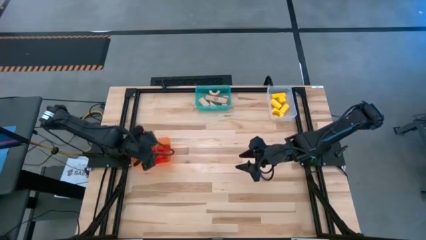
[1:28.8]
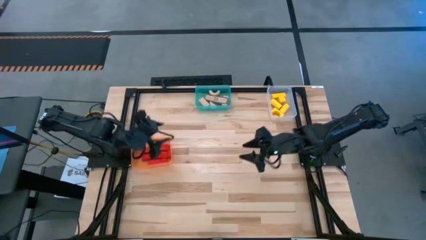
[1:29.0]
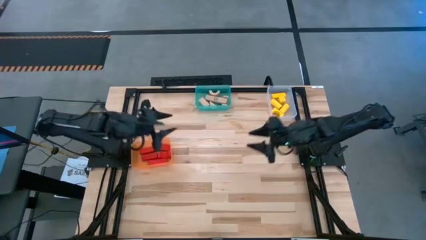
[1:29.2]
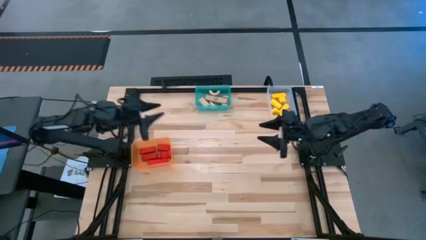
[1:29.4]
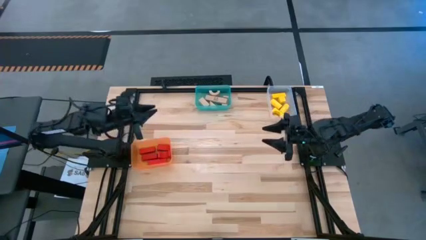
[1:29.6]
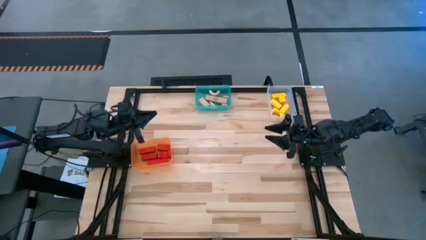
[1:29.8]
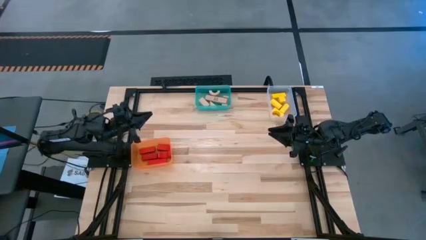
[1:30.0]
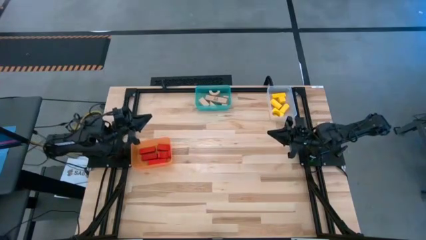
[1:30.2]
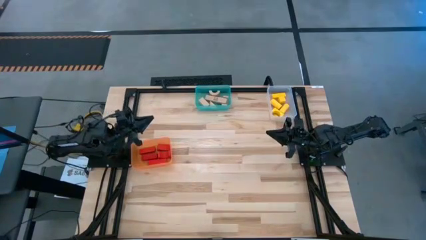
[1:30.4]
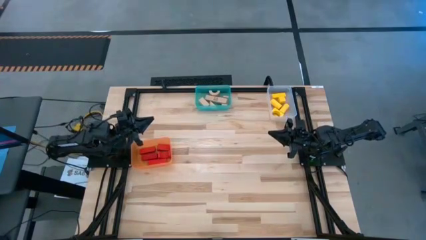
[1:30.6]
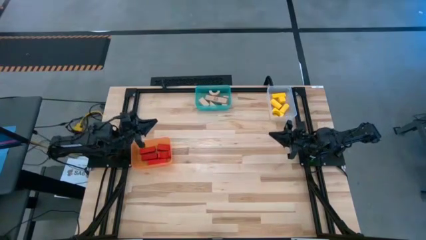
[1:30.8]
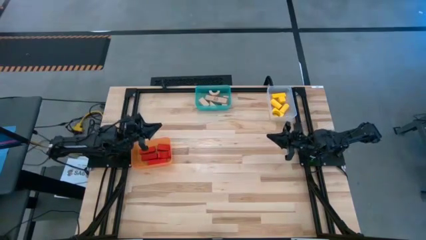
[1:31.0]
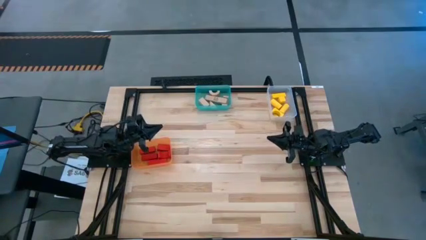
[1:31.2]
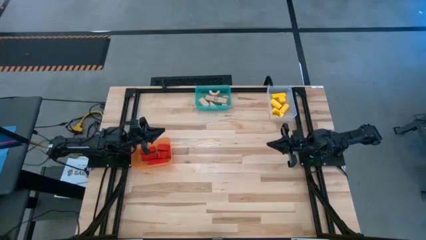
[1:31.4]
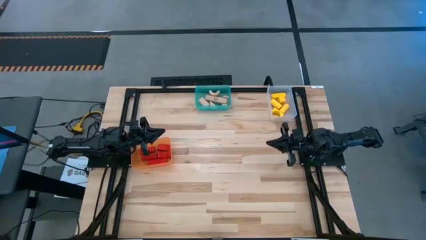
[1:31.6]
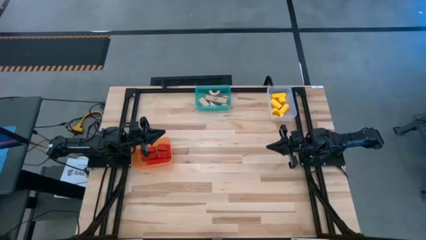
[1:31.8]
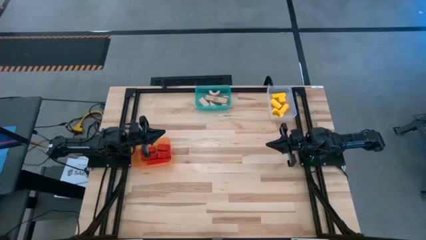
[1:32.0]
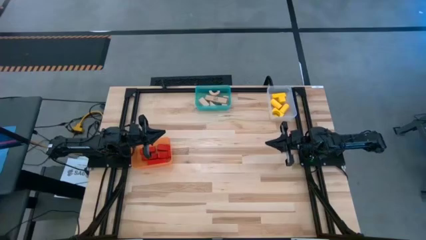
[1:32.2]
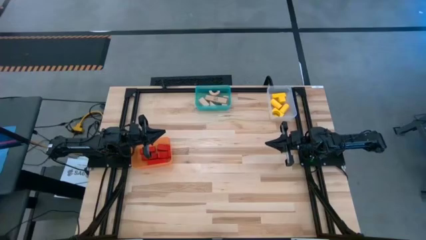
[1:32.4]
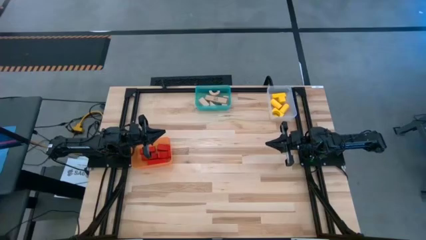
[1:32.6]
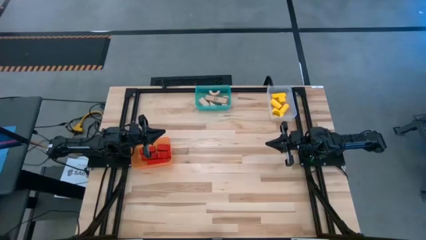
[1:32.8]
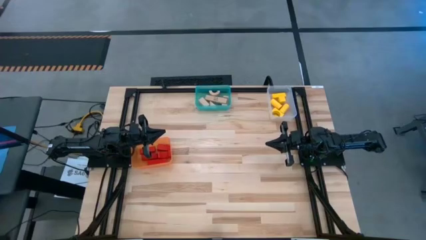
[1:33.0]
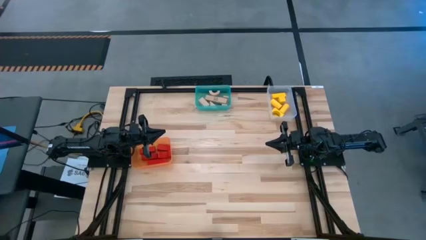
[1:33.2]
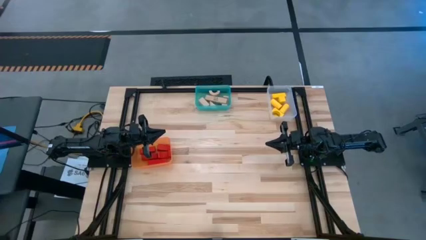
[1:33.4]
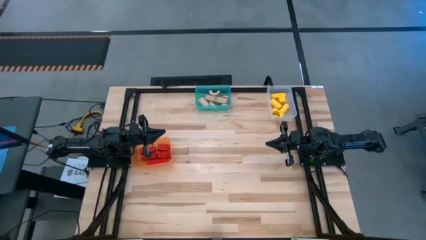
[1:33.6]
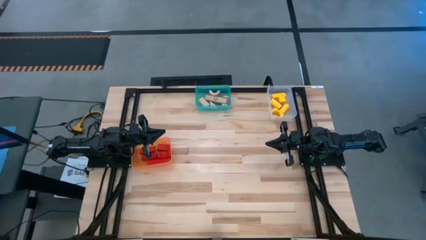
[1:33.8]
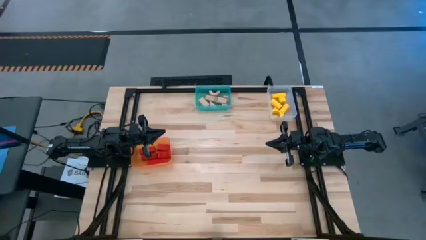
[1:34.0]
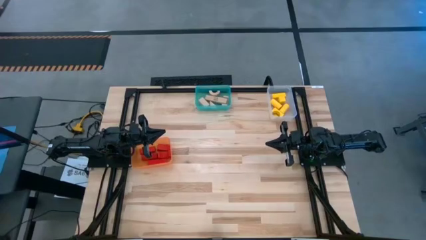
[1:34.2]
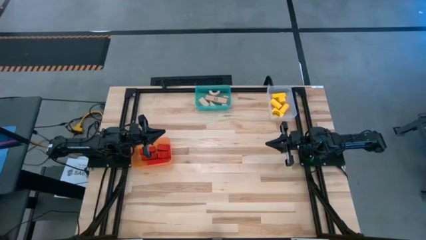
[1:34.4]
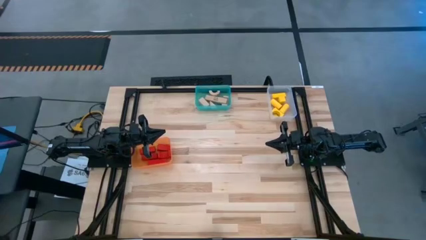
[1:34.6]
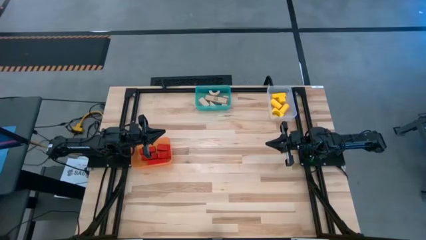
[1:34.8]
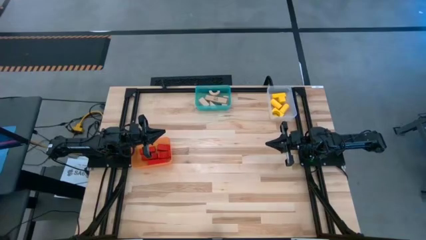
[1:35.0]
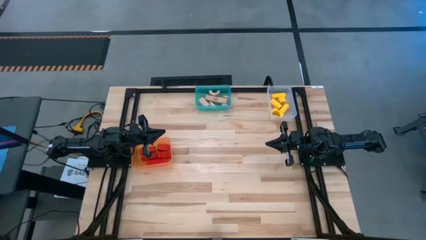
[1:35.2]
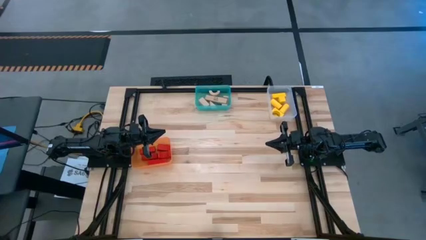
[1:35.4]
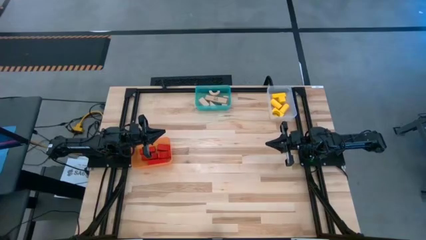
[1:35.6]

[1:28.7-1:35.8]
Task: Sort & place blocks by color
Return to Home Position

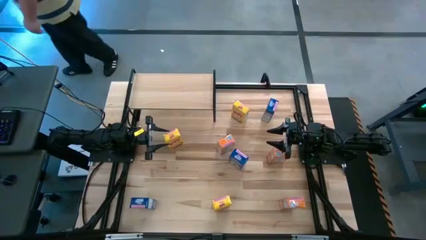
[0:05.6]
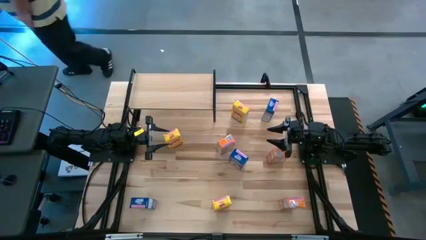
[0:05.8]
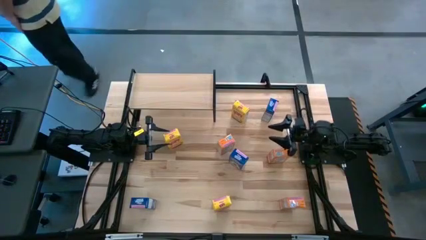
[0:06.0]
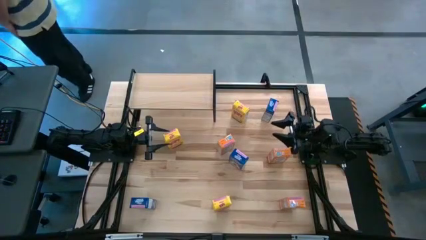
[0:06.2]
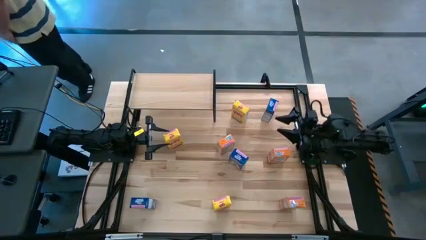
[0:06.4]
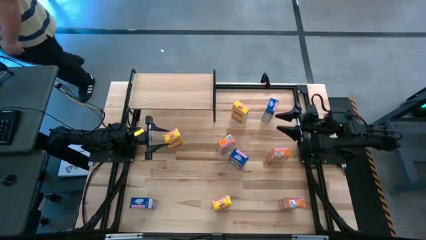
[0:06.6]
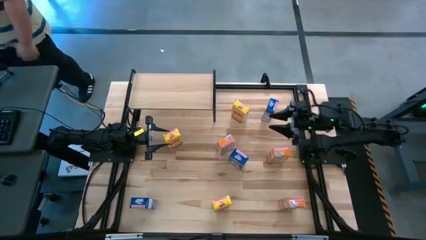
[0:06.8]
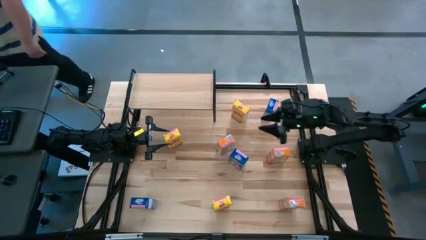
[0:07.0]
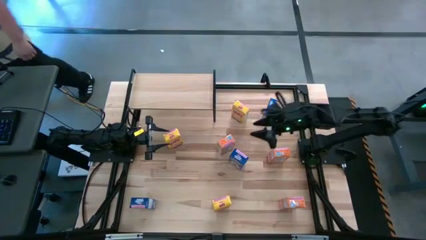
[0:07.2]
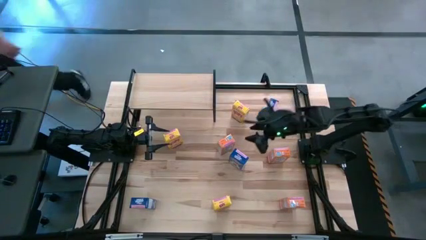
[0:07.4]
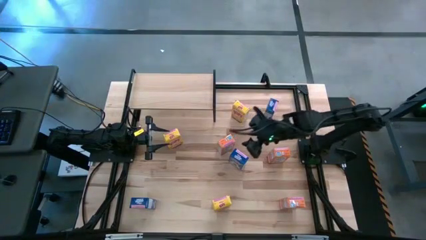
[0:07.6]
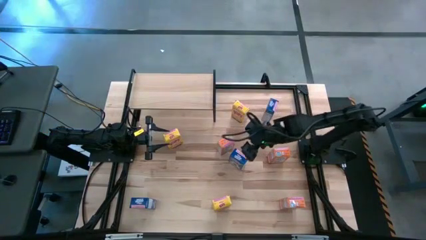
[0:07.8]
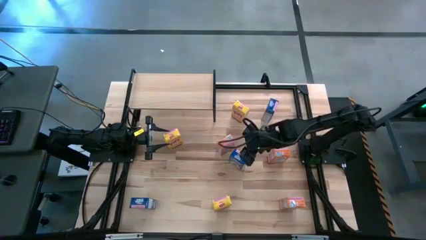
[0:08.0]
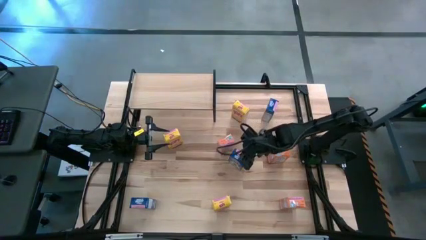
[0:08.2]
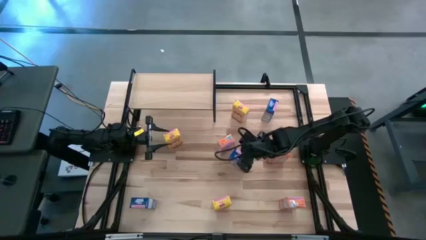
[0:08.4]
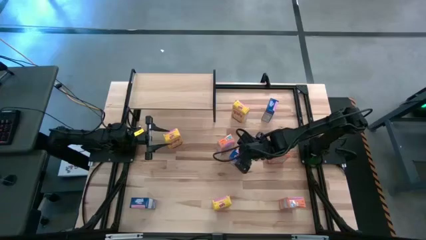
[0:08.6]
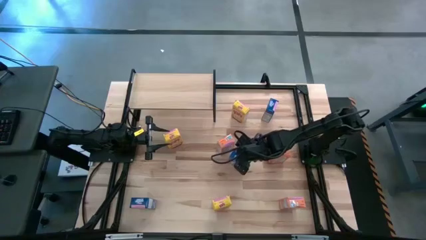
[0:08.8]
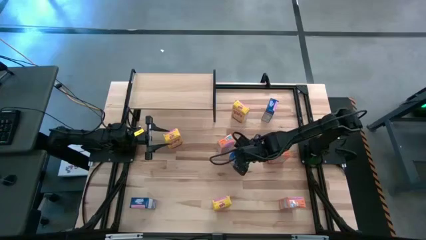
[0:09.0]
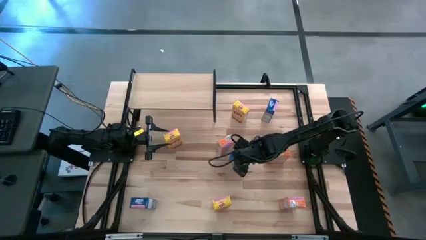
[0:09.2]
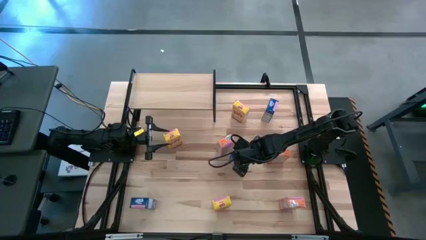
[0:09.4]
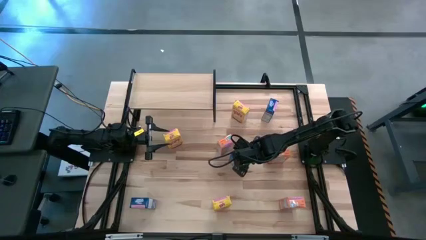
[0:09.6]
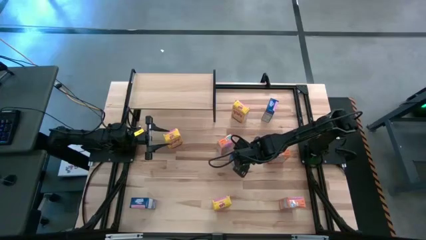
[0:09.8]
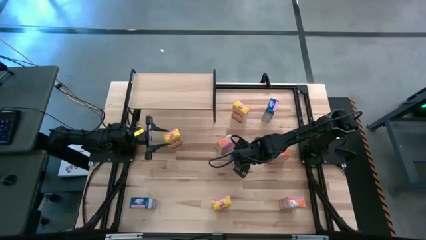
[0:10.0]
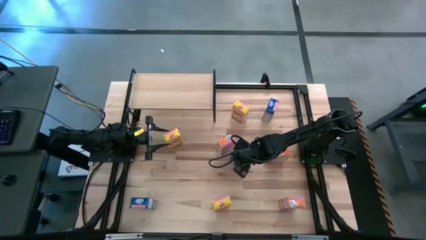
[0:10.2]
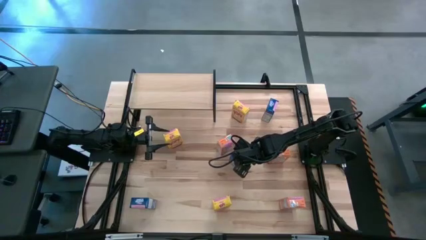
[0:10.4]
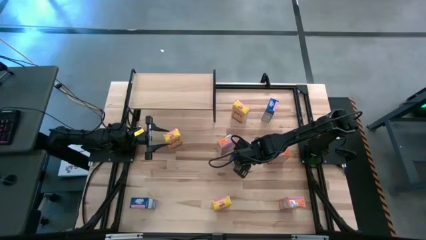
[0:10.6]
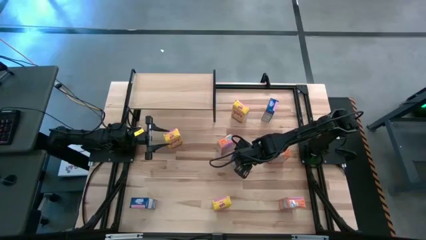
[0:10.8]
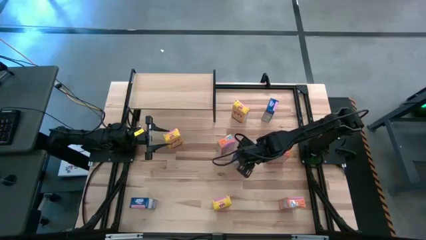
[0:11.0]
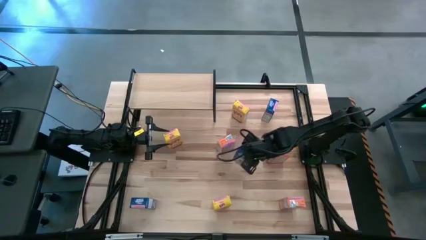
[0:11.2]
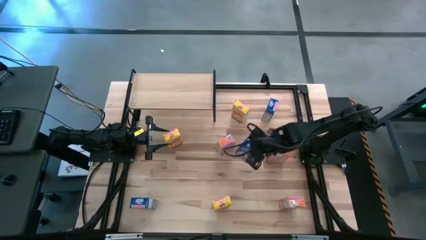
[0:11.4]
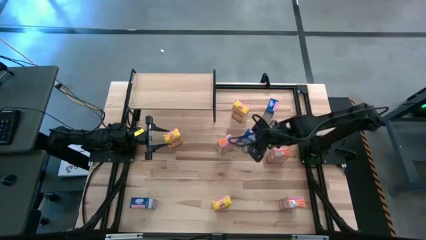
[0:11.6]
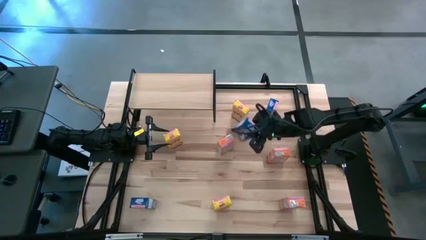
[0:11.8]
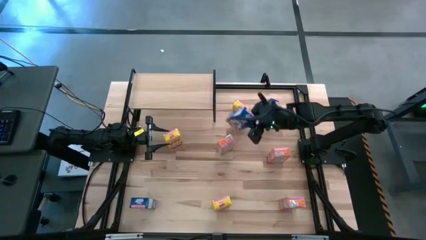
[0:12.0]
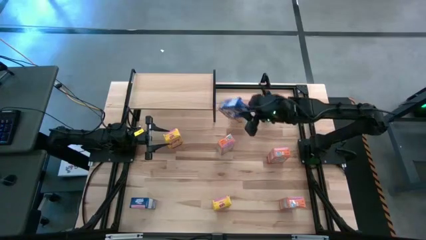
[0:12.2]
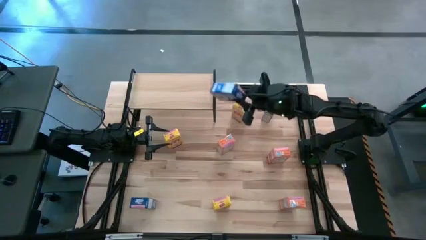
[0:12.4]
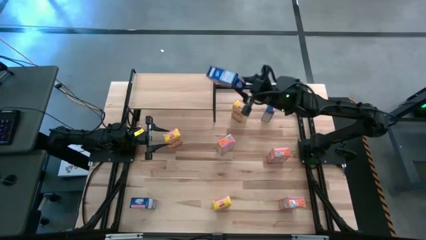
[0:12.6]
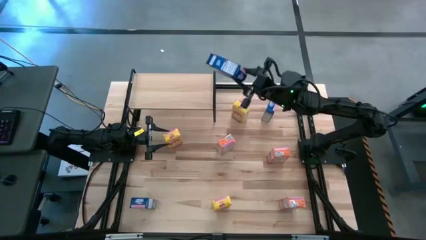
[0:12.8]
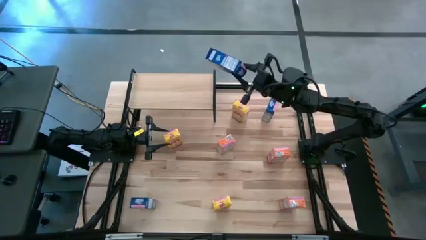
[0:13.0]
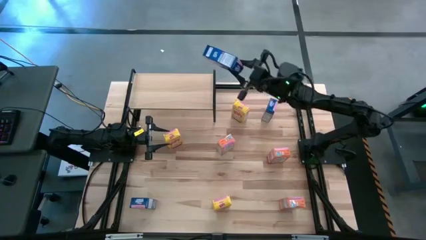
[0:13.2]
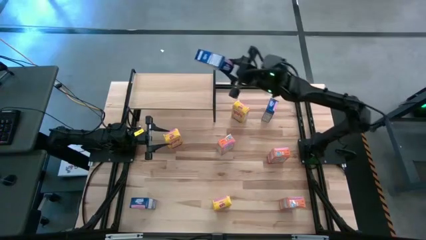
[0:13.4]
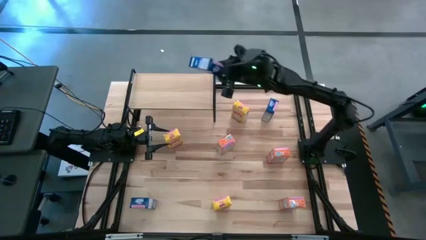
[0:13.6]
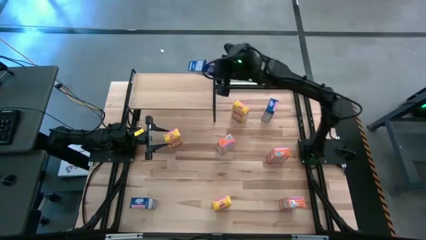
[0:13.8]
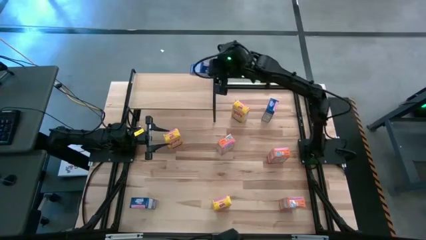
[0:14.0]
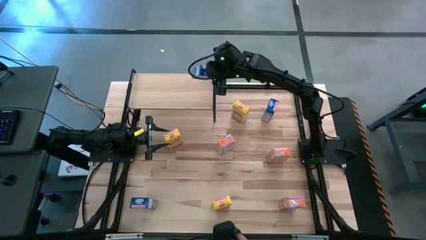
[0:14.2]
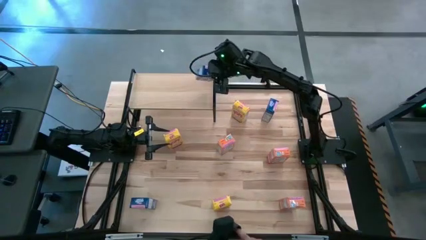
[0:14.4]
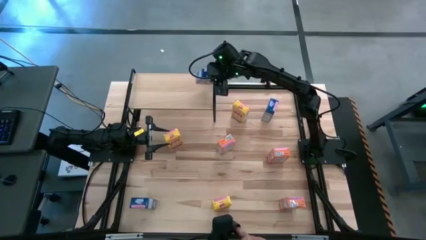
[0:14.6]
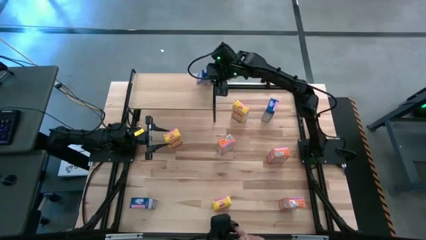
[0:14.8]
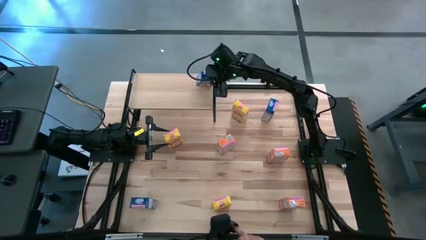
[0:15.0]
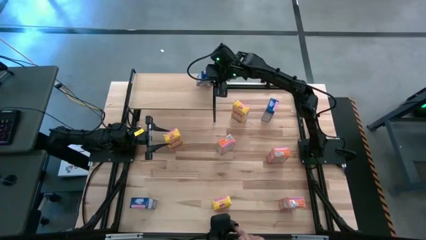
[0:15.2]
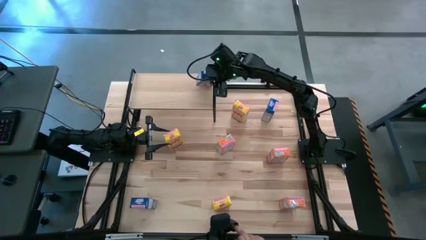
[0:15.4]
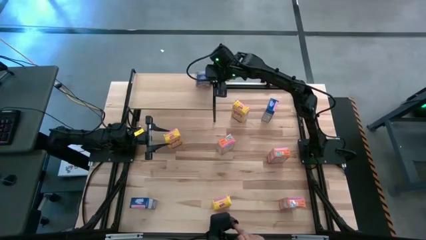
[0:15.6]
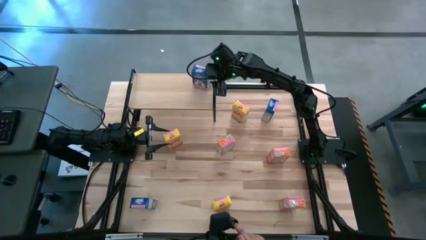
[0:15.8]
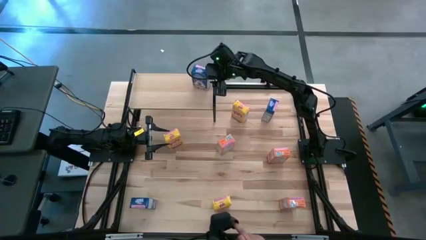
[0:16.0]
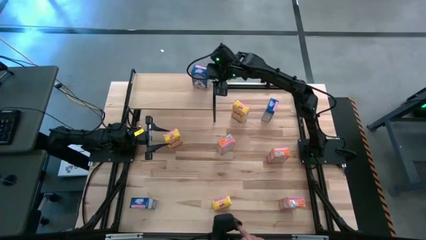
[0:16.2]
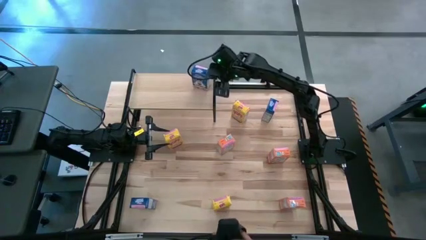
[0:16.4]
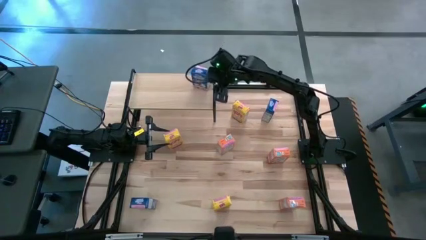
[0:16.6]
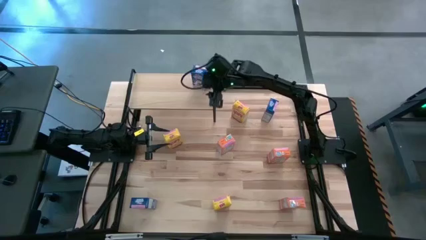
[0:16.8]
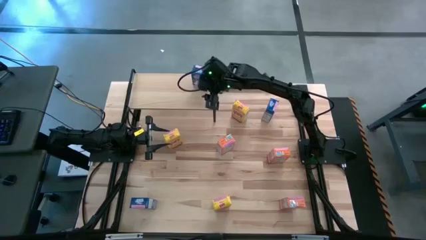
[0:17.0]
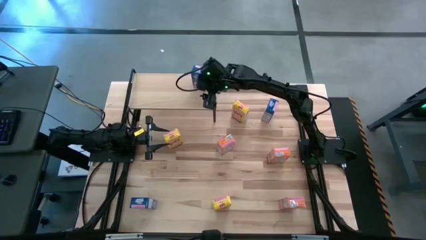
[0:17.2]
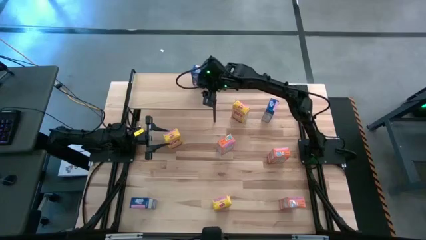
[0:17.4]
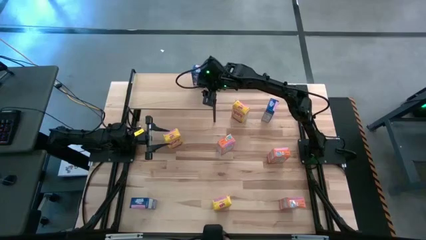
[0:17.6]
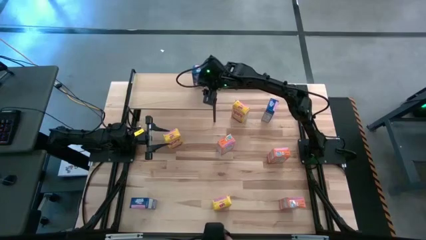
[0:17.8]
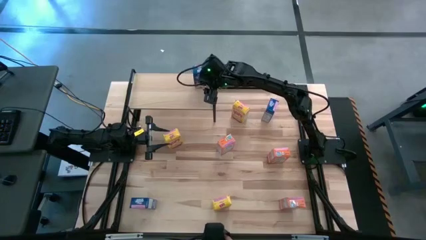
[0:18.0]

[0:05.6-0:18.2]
Task: Stack cereal on shelf
Put the middle blue cereal box on the shelf
